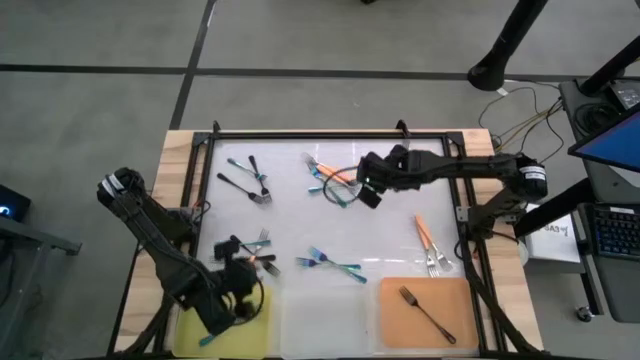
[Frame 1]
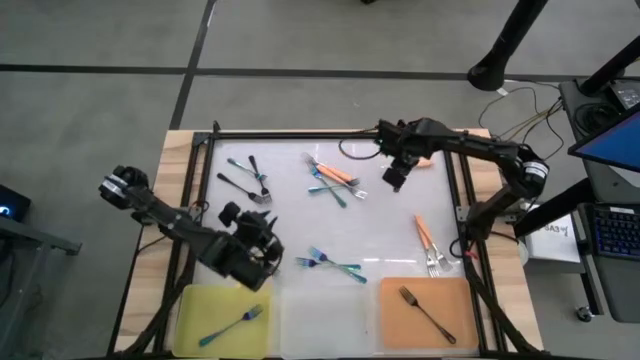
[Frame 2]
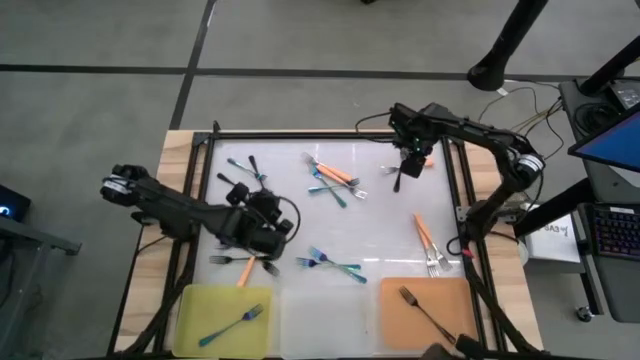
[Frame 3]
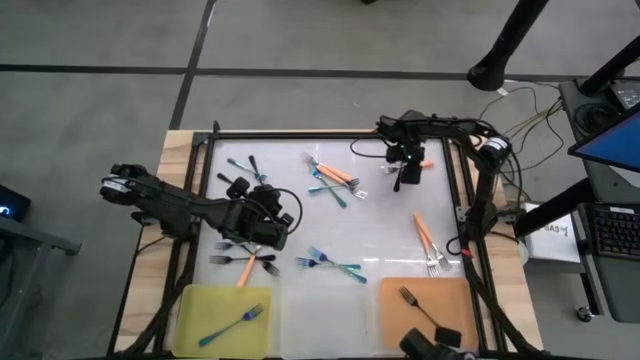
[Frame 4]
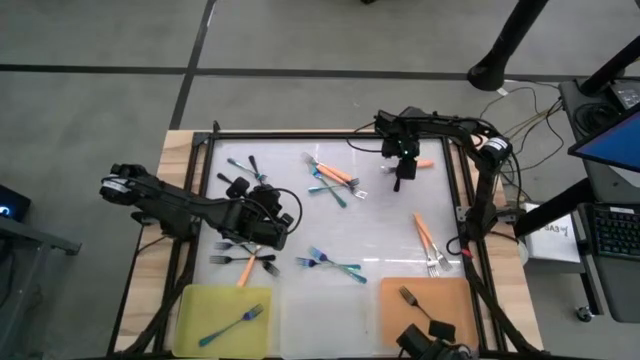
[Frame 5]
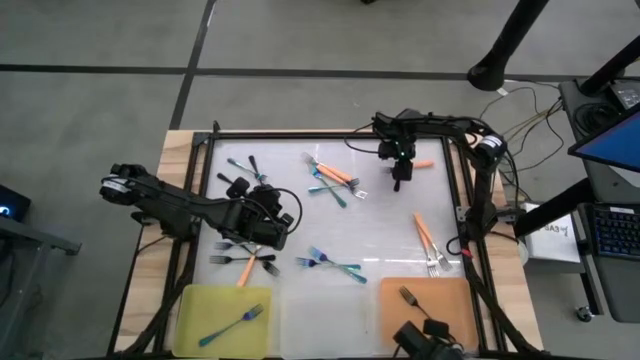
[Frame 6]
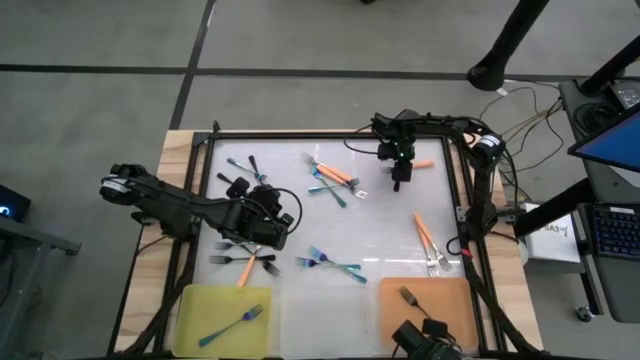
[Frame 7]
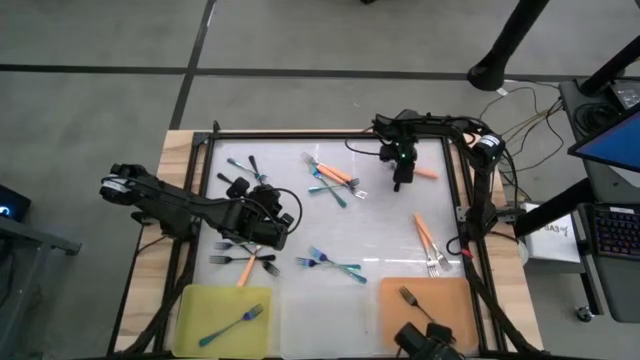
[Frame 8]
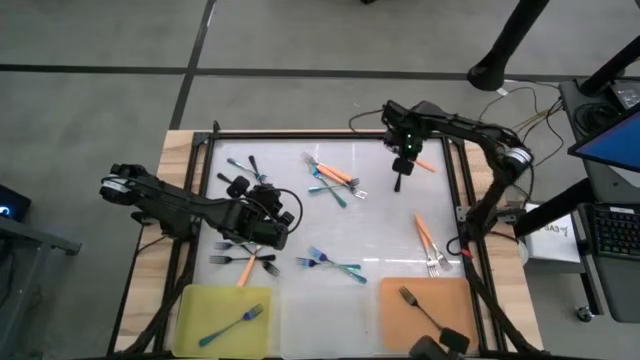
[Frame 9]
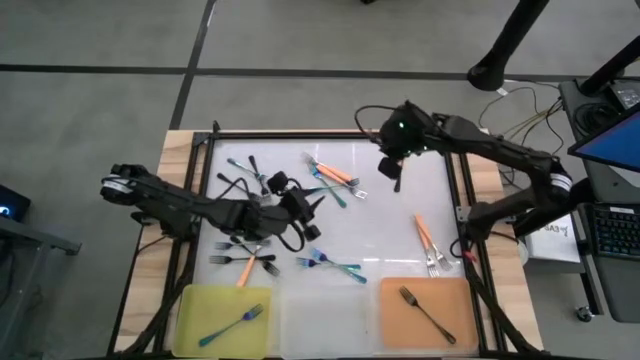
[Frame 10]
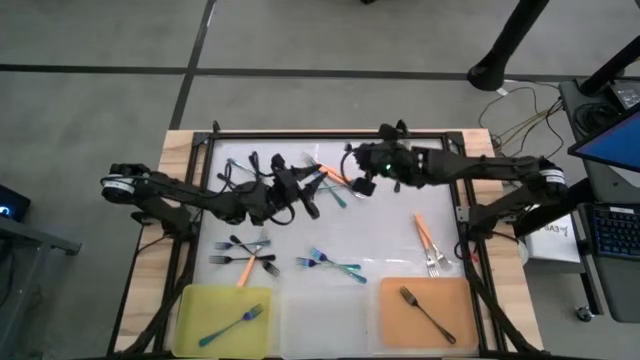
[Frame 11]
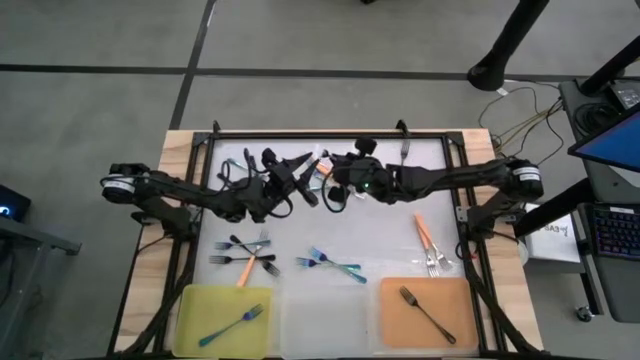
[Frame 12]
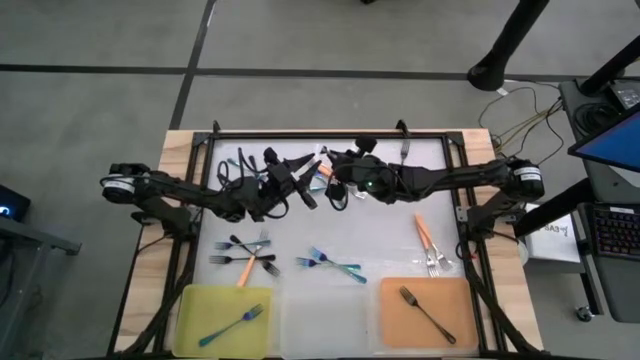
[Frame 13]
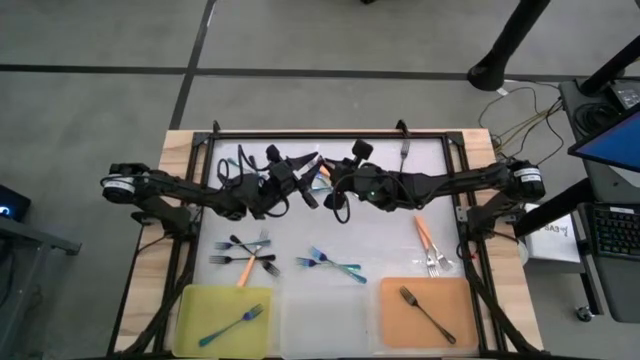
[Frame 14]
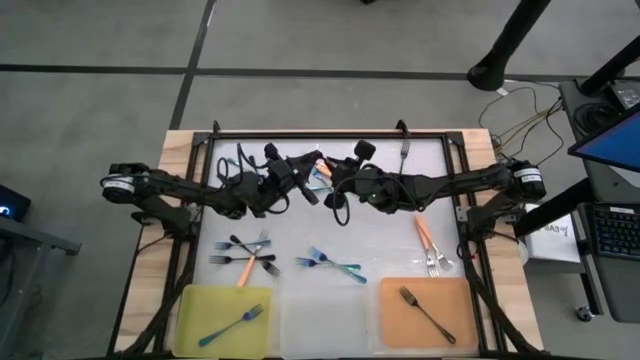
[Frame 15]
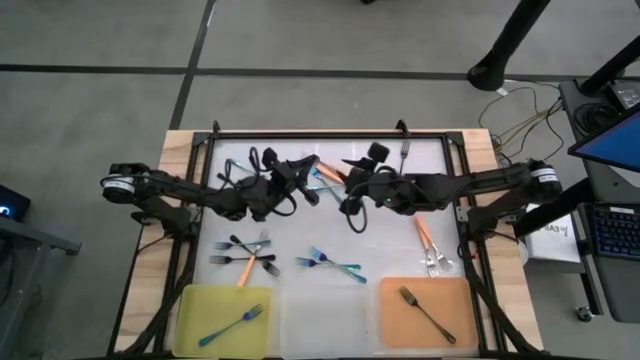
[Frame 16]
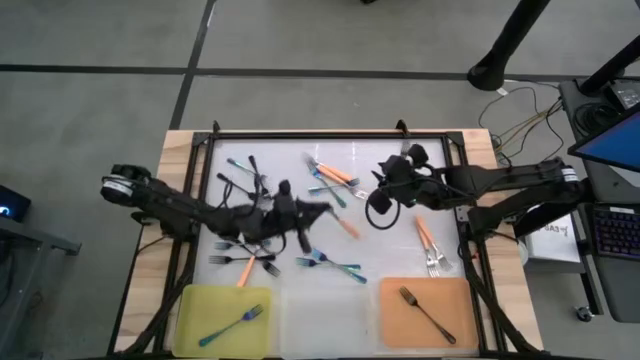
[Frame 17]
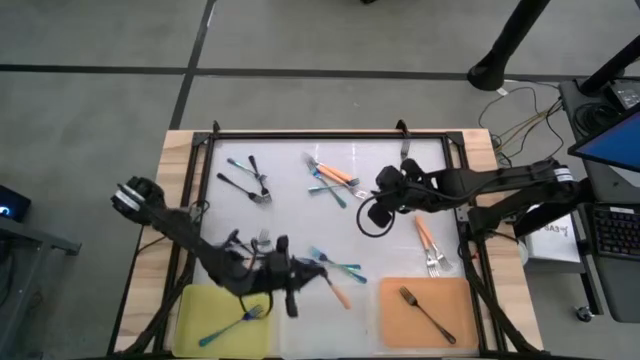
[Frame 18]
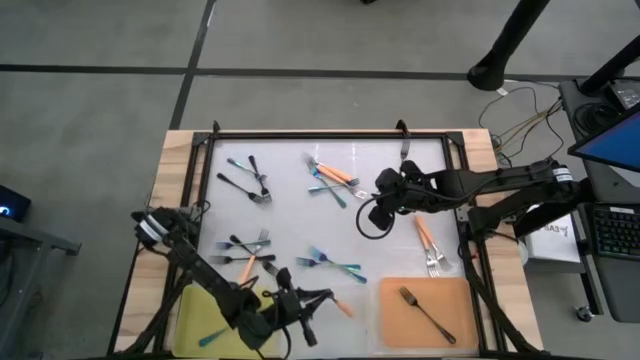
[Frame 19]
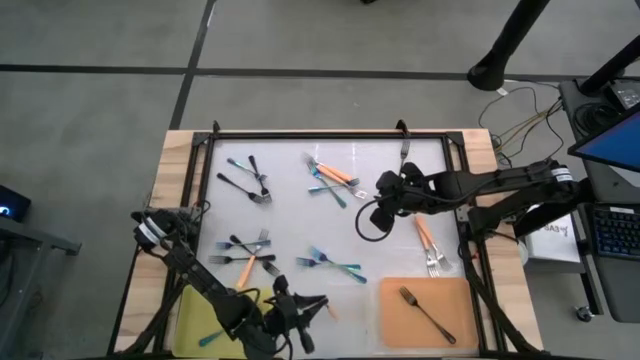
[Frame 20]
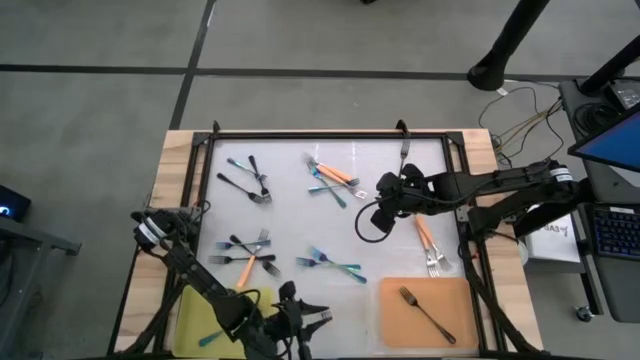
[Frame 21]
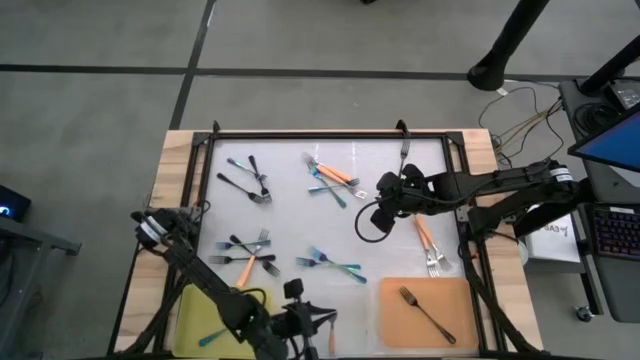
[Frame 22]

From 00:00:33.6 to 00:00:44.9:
Task: Sort silverware by color (type)
Put the orange fork into the transparent bin

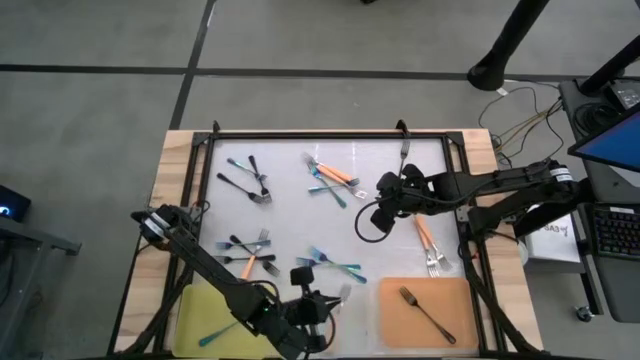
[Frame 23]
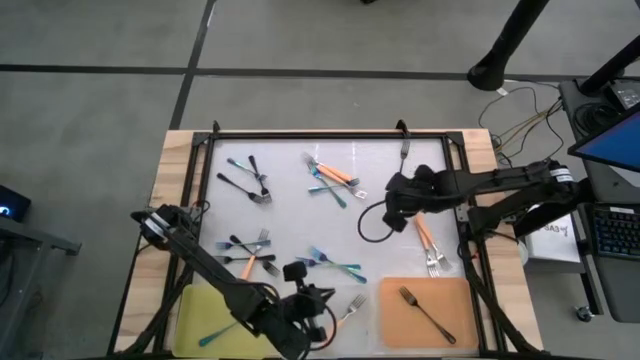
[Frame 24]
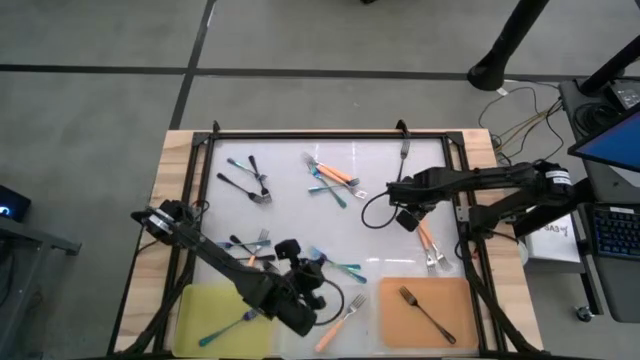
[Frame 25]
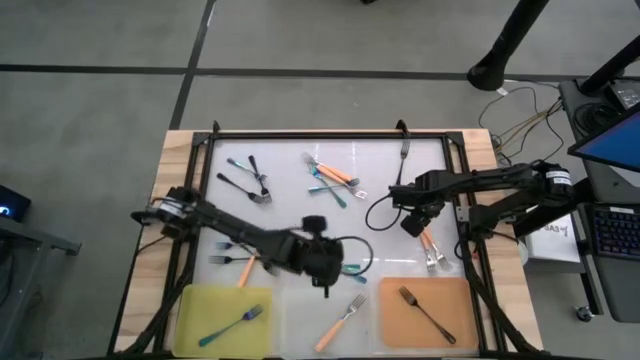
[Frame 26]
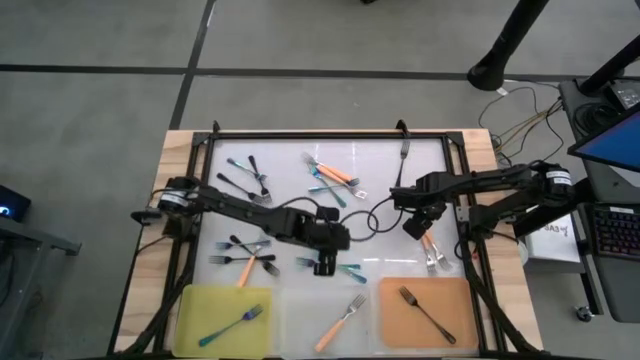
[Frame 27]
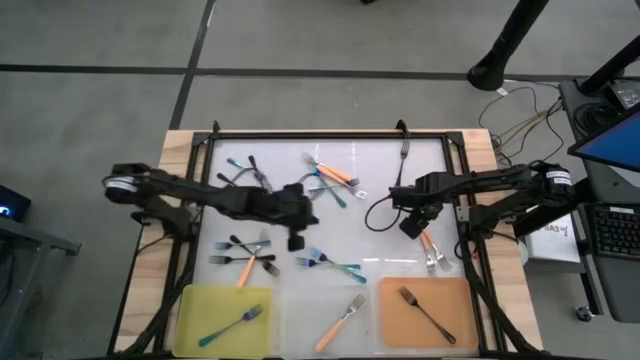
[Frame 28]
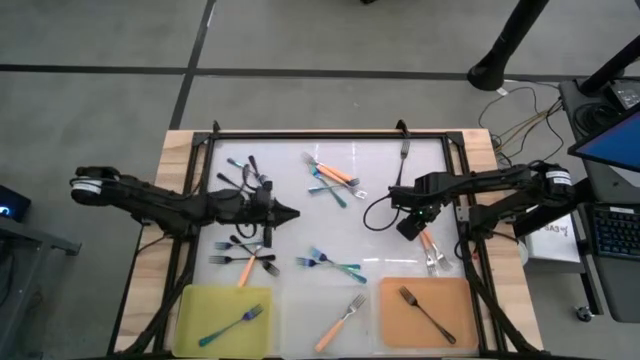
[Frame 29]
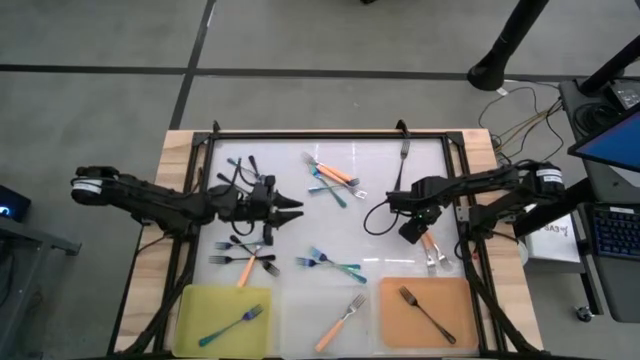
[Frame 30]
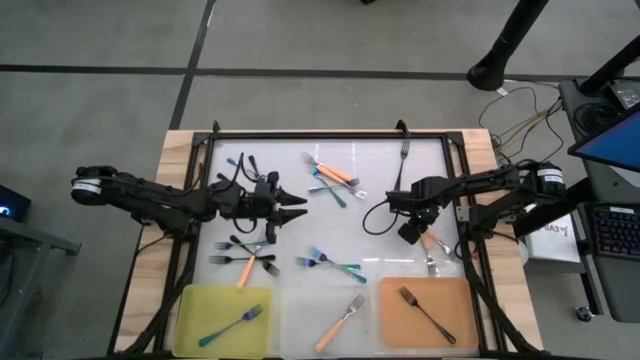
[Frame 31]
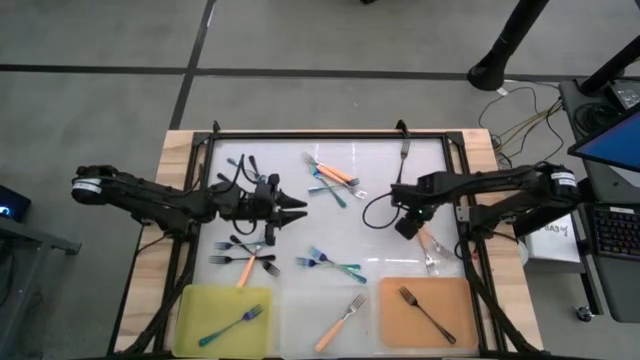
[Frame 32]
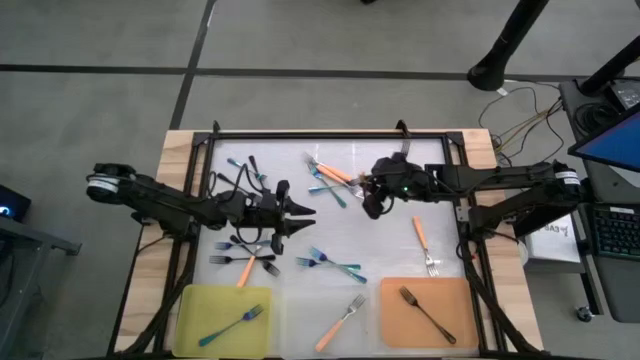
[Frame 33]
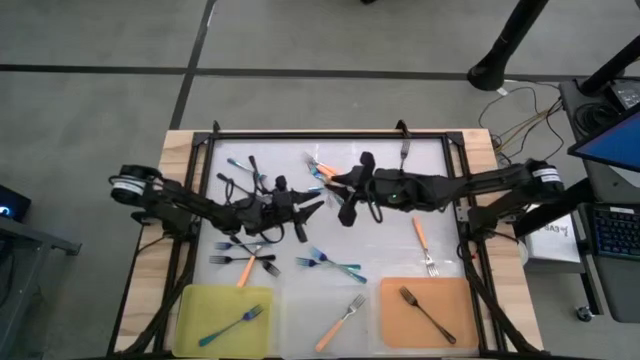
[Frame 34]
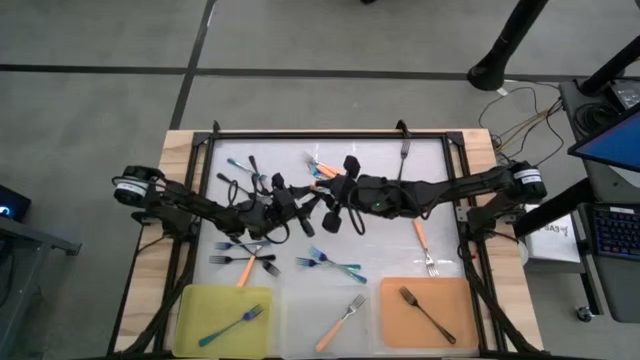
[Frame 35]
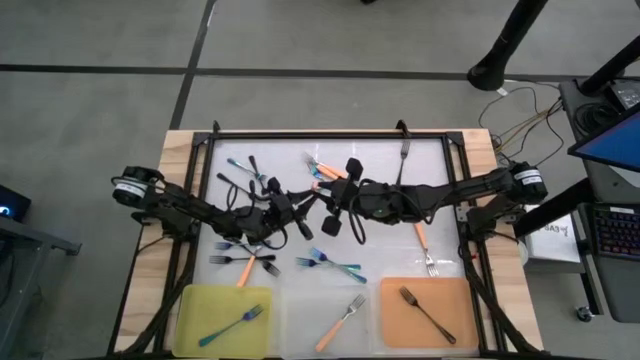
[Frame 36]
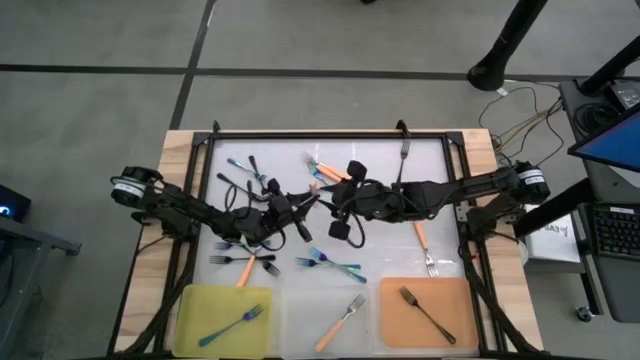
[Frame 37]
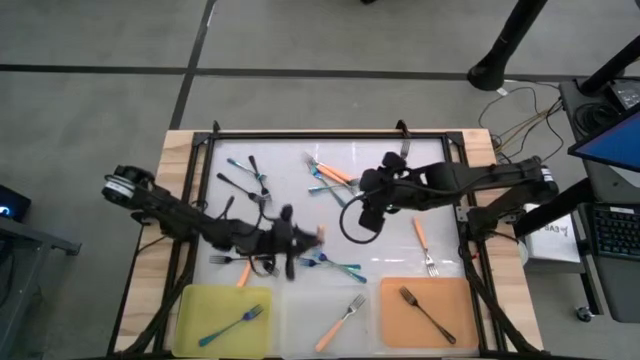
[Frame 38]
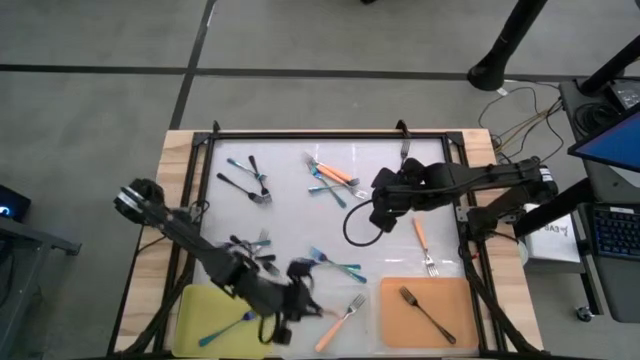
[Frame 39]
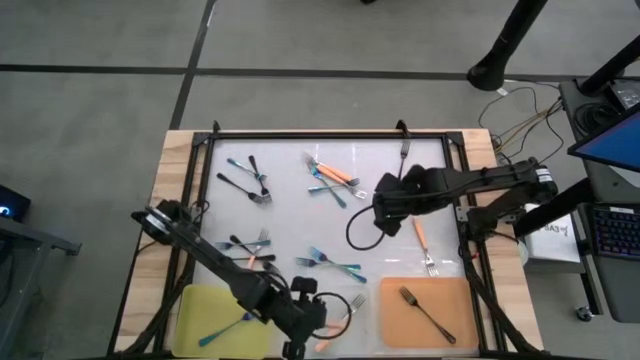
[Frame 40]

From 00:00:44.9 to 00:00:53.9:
Put the orange fork into the transparent bin

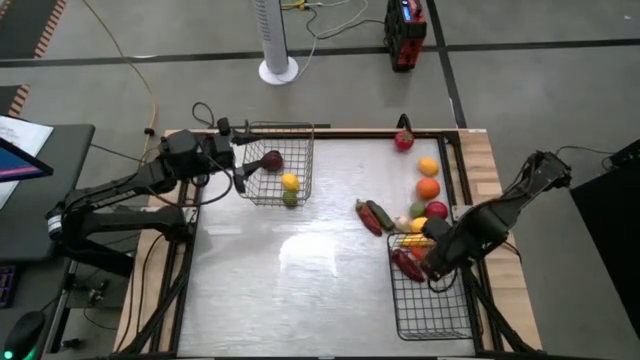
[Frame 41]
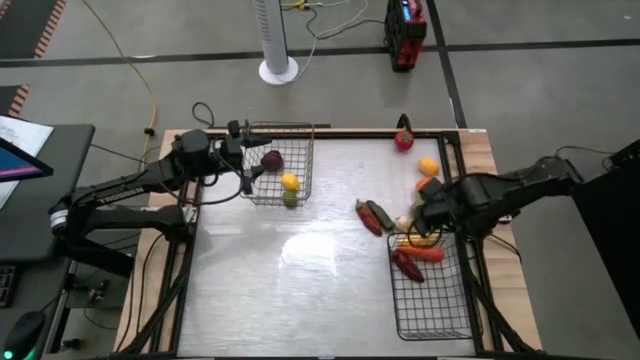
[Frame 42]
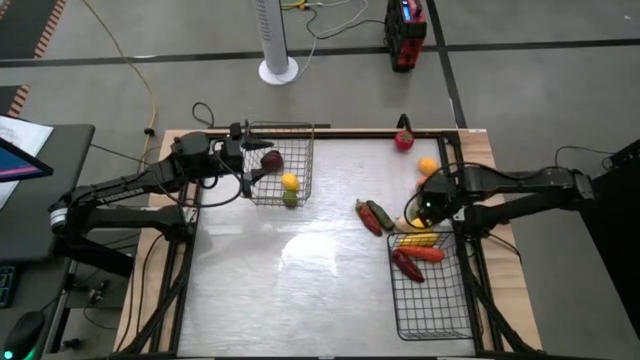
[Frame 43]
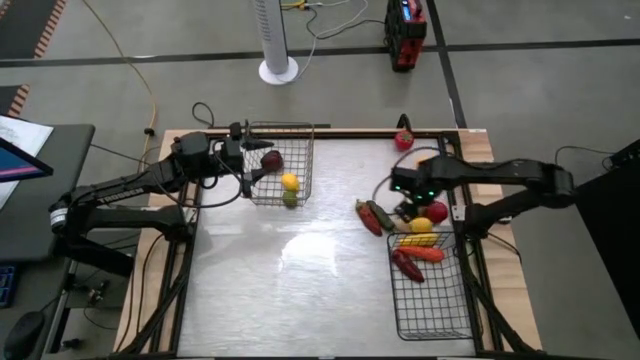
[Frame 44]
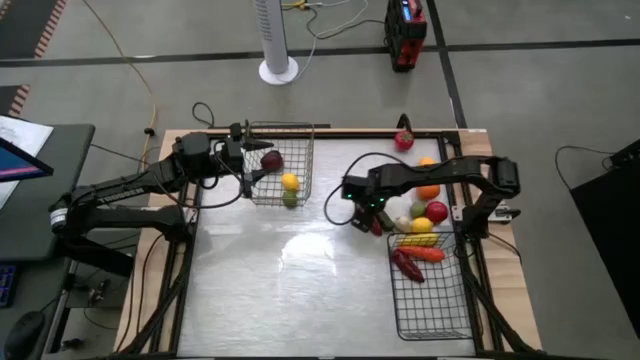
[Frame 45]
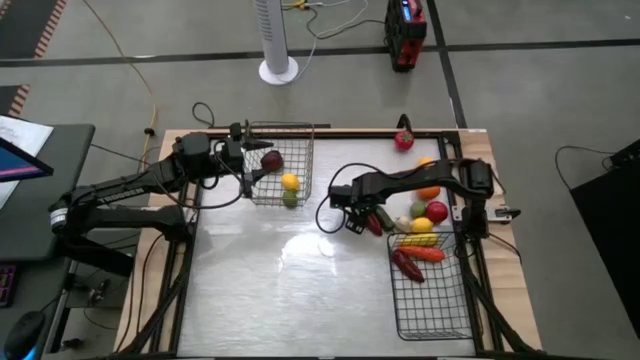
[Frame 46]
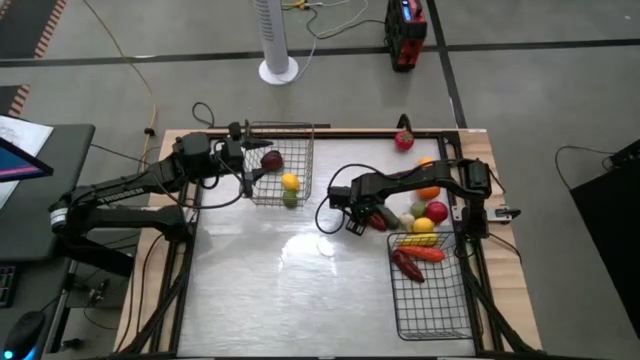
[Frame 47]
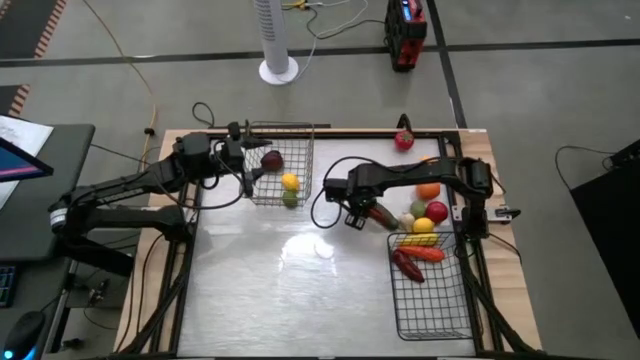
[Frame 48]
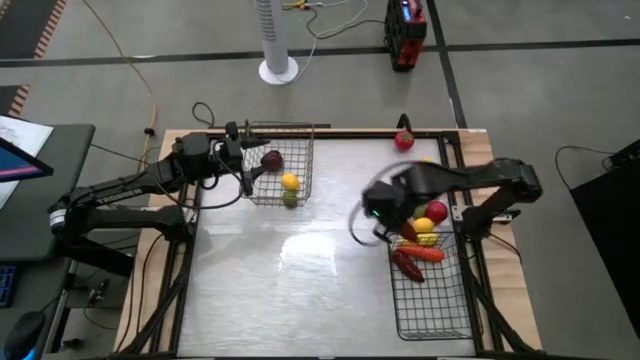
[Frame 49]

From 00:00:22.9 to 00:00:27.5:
Task: Sort produce into baskets
Put the red bell pepper into the right wire basket
